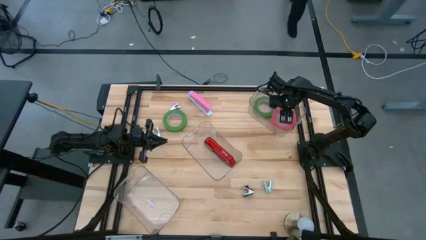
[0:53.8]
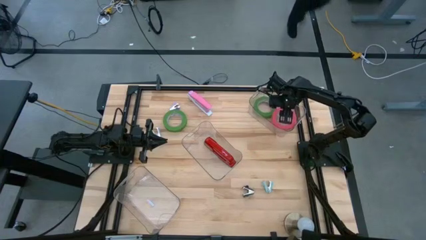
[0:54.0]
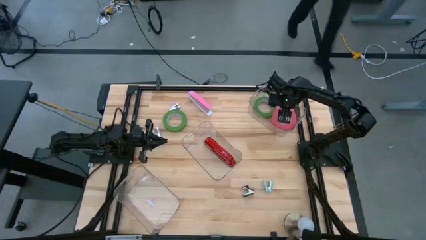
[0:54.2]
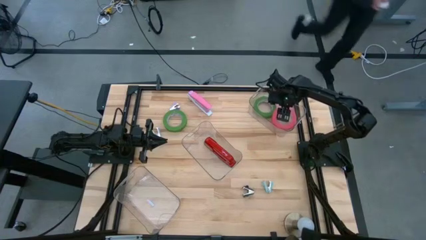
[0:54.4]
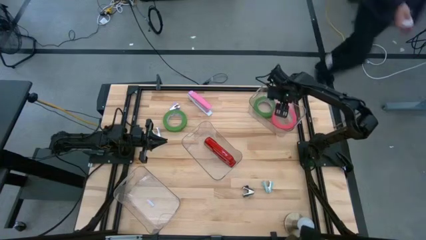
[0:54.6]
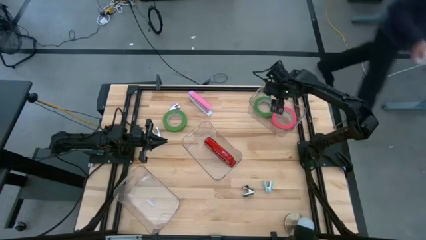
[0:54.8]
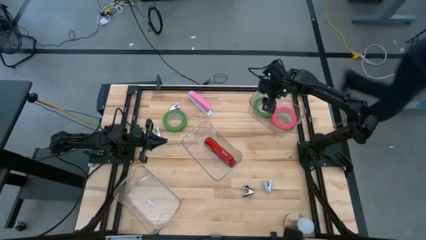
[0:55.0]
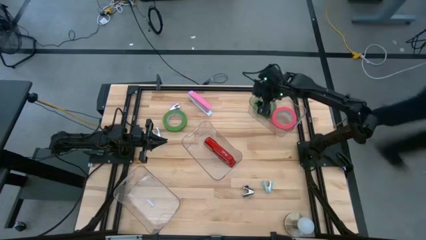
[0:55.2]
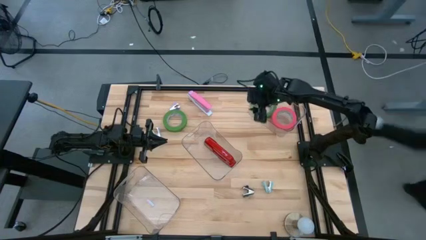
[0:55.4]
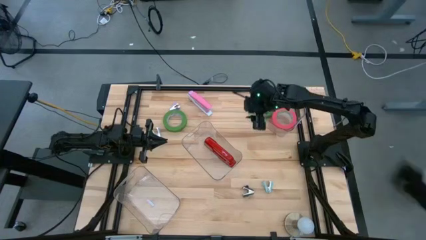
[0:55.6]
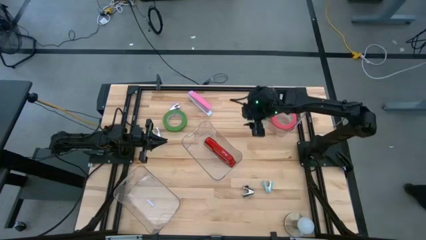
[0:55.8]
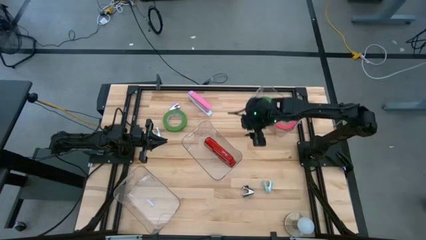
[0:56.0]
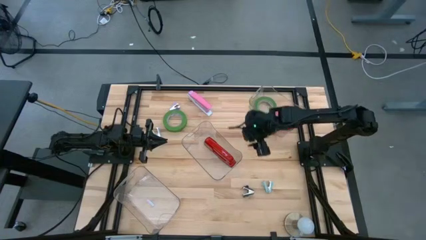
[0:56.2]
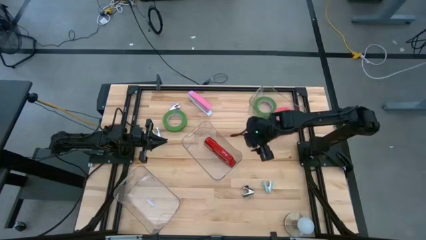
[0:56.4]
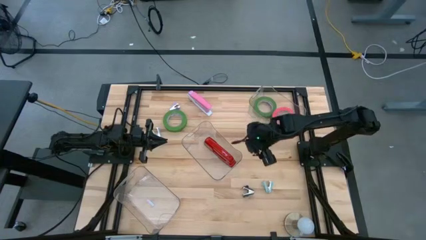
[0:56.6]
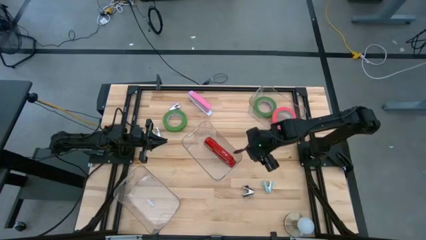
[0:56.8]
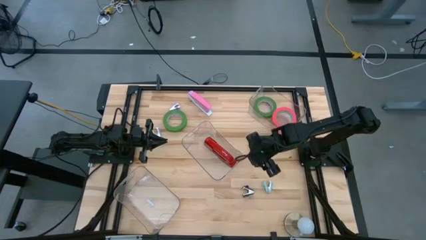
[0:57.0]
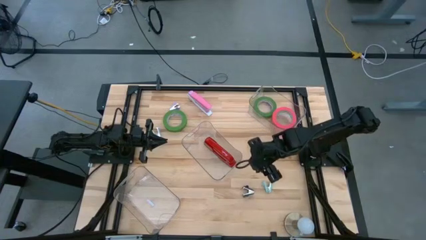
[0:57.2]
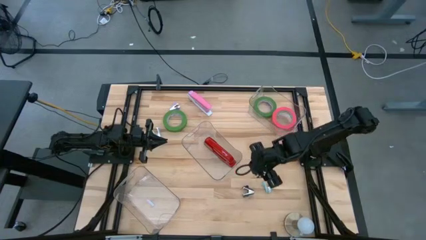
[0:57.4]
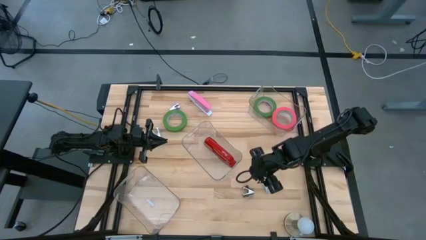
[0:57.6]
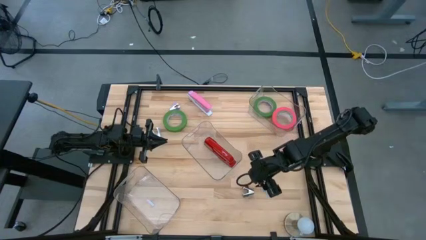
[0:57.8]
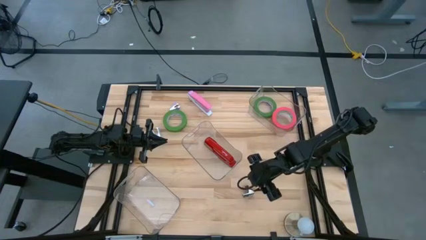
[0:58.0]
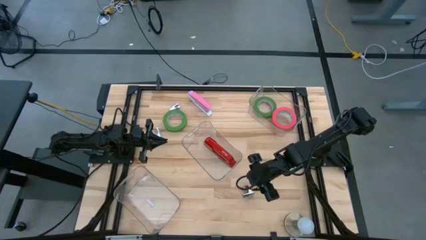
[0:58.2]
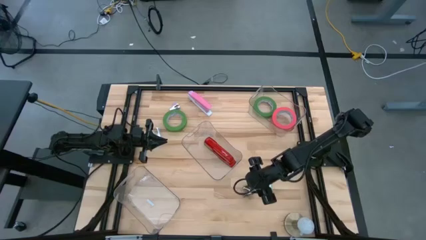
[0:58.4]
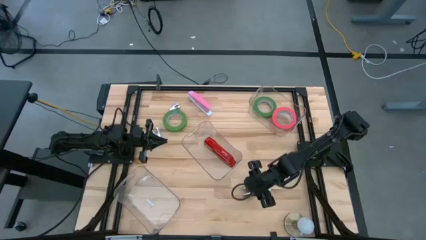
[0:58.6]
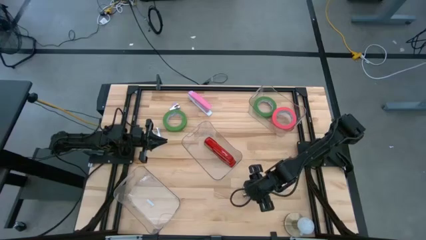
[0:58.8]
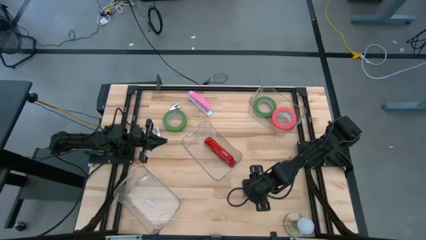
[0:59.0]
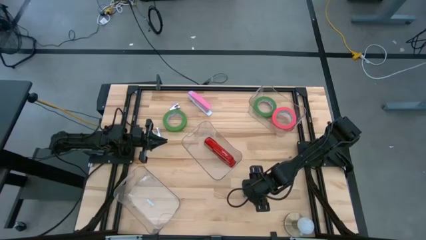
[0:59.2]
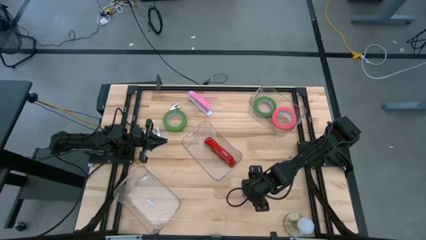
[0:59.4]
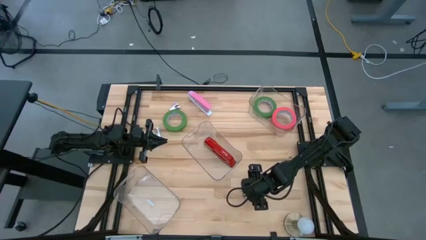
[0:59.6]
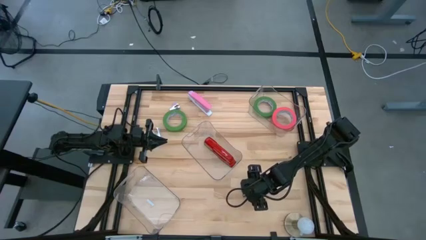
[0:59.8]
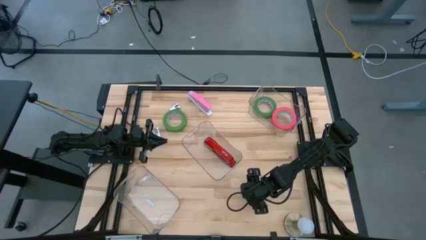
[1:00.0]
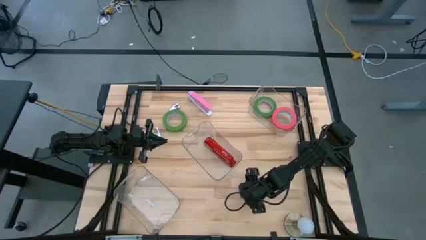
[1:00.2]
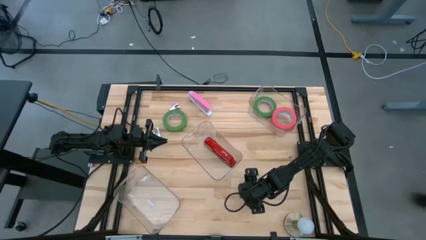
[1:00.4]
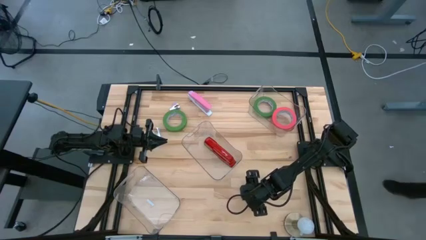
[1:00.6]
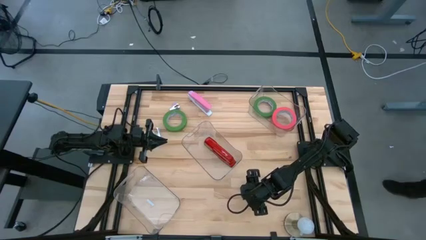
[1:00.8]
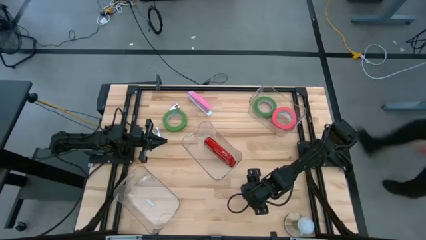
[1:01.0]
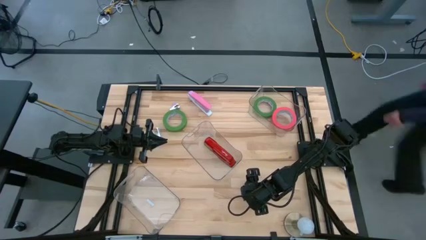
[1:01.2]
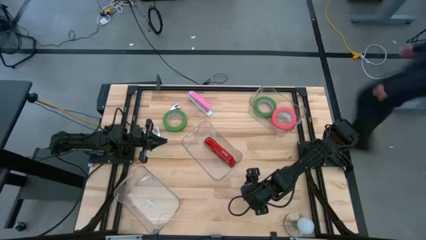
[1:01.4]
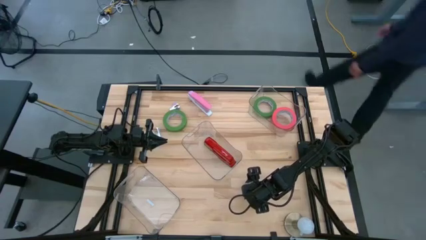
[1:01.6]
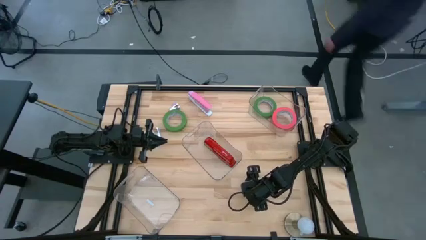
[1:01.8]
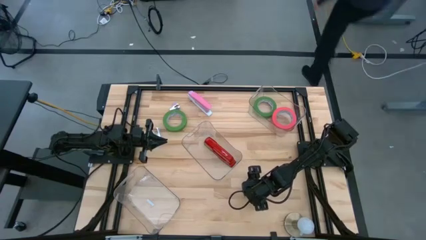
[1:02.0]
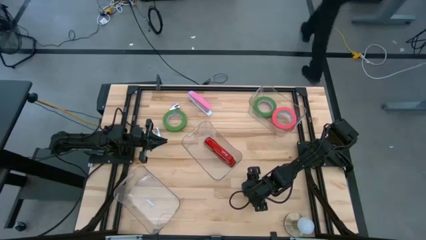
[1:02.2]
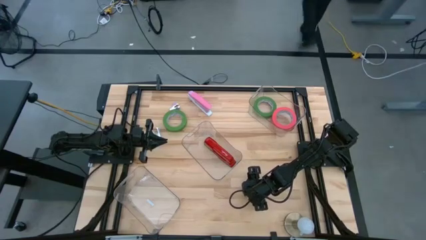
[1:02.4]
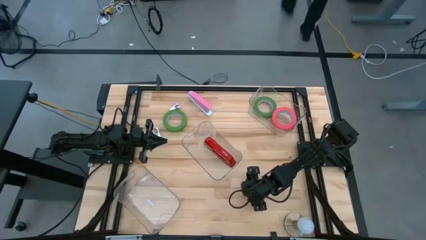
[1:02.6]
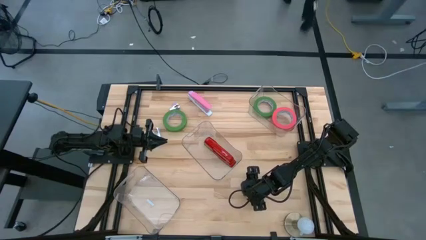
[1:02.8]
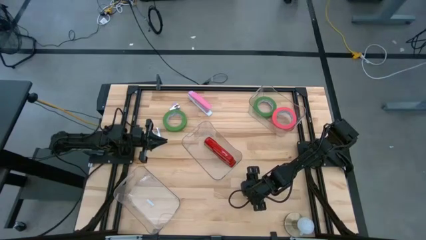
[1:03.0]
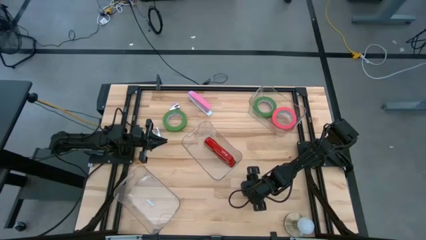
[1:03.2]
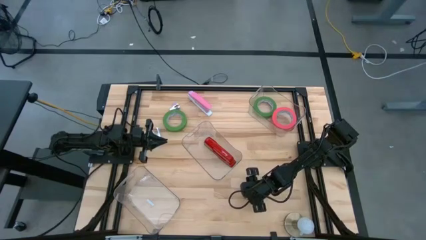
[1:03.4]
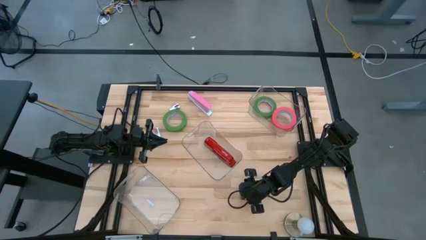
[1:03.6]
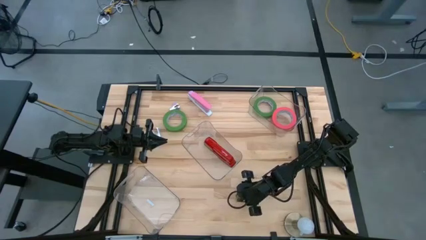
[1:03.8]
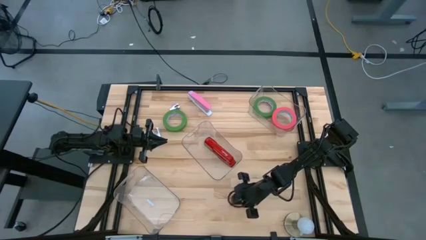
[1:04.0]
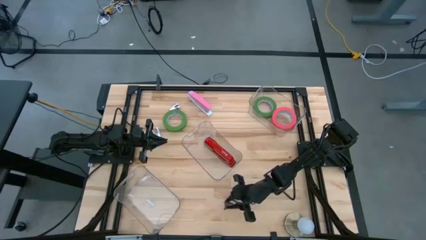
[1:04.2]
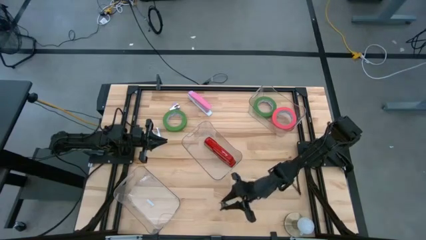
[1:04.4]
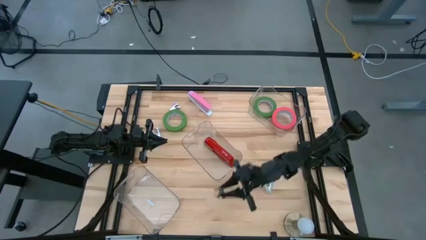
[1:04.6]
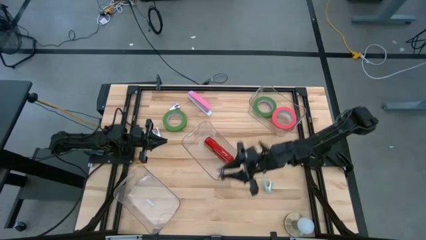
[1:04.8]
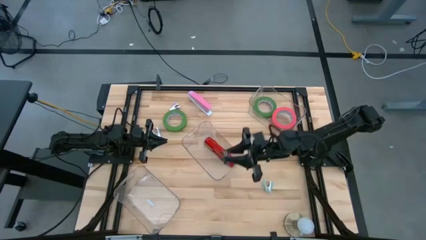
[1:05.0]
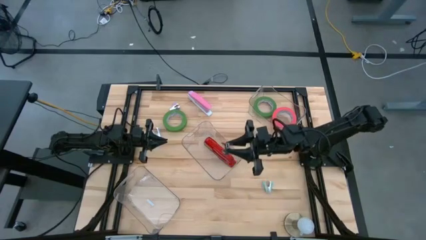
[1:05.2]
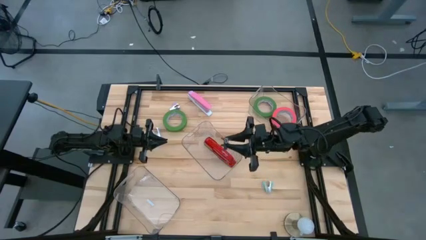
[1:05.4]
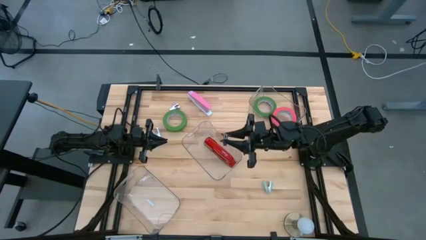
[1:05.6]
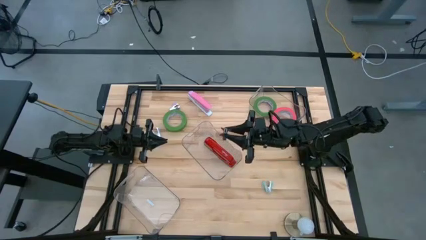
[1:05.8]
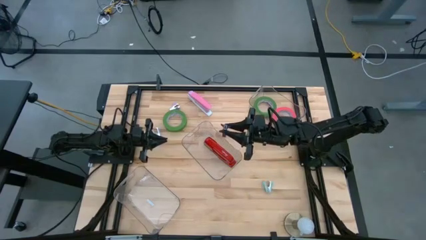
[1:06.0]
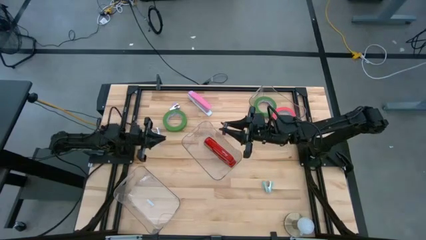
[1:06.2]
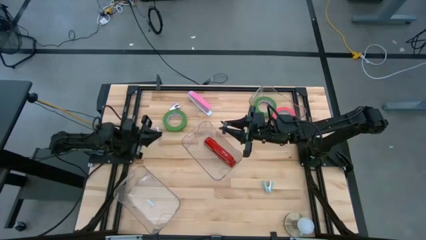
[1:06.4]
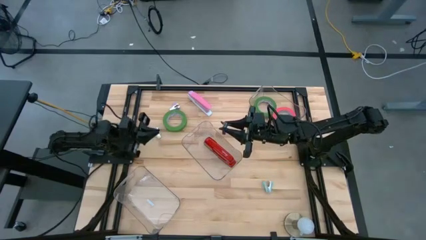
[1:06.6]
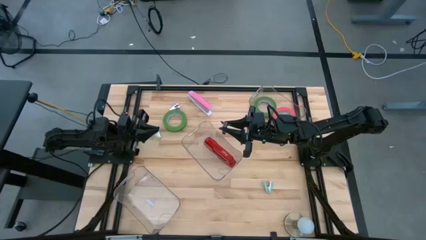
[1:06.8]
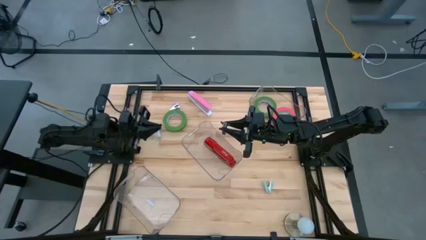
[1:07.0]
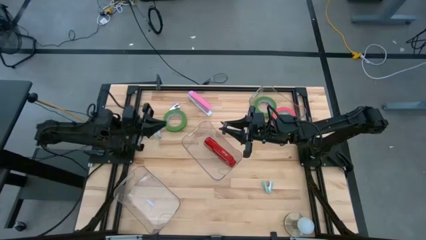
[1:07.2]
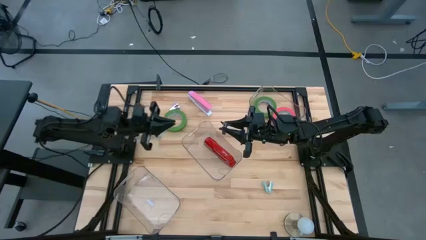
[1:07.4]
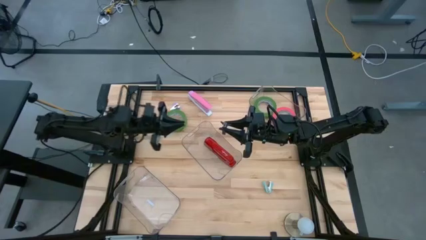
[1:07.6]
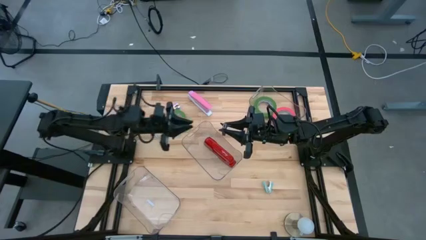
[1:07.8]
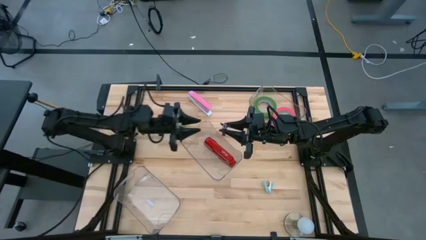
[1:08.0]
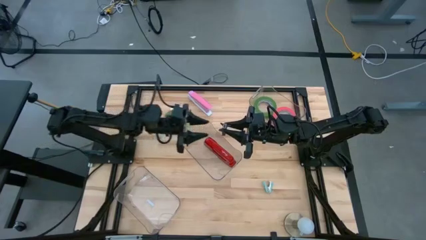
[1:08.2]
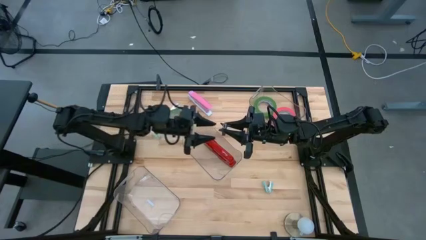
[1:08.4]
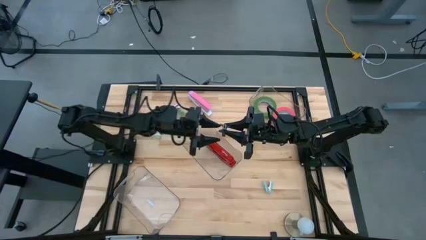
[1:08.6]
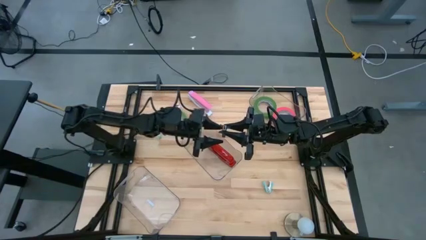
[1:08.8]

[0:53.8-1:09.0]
Task: Pick and place Stapler, Stapler remover, tape
Put the black staple remover into the bottom transparent bin

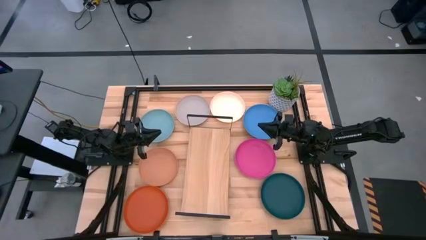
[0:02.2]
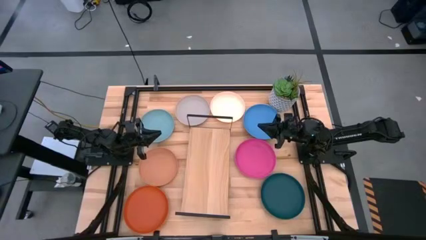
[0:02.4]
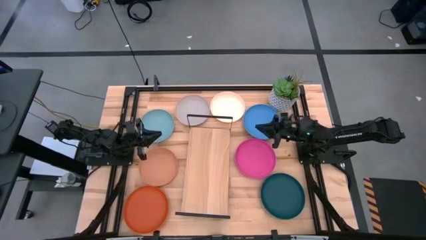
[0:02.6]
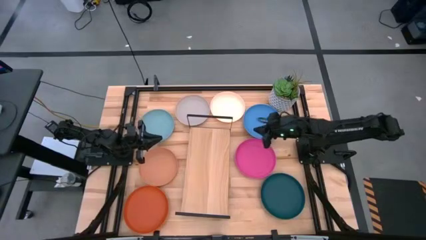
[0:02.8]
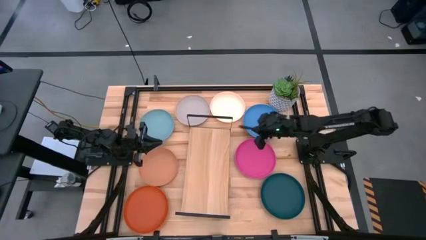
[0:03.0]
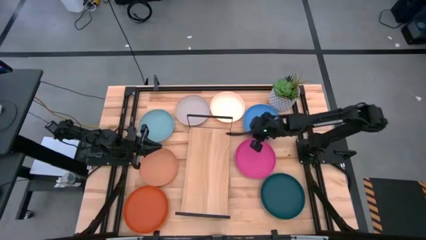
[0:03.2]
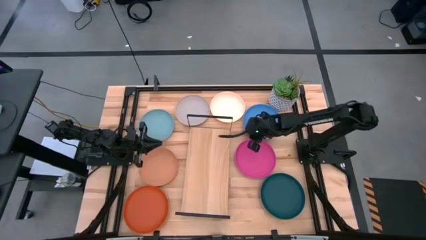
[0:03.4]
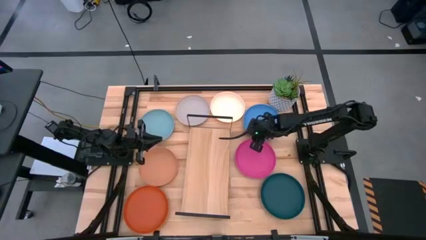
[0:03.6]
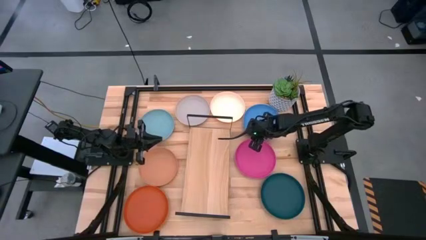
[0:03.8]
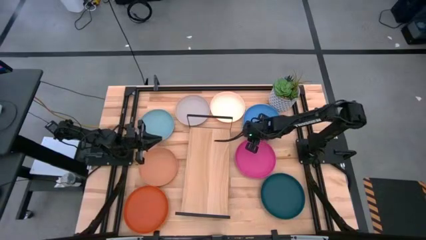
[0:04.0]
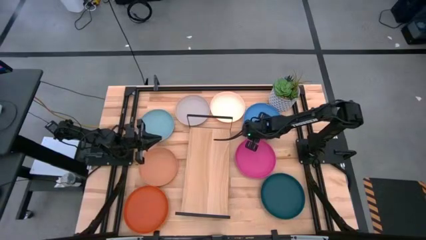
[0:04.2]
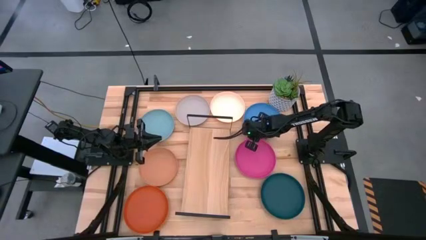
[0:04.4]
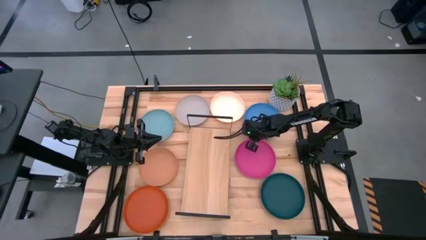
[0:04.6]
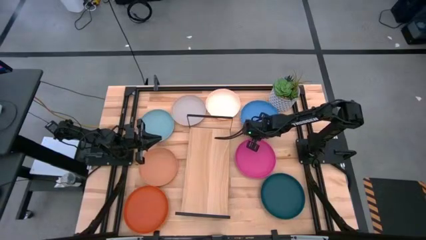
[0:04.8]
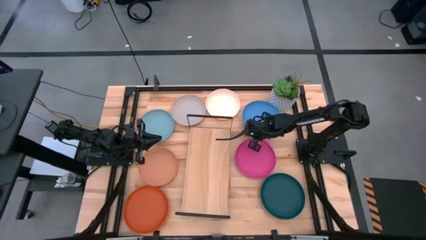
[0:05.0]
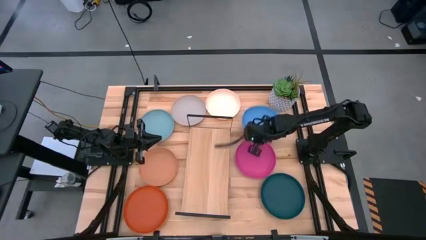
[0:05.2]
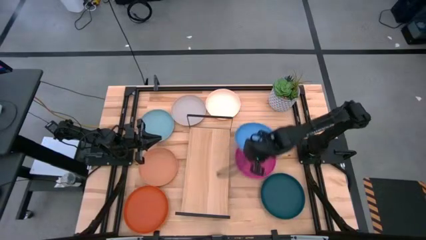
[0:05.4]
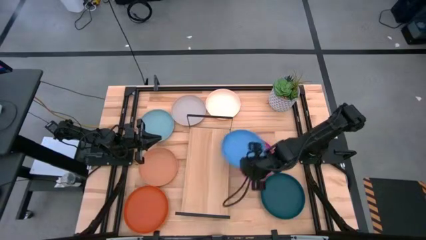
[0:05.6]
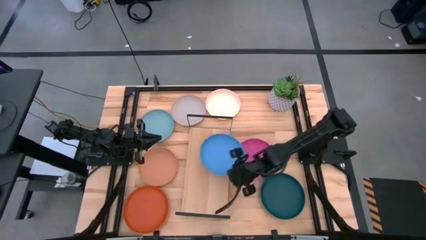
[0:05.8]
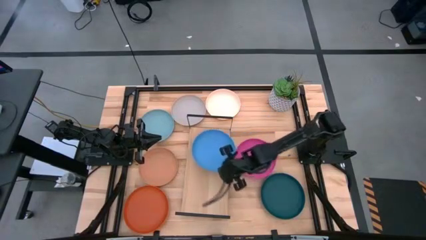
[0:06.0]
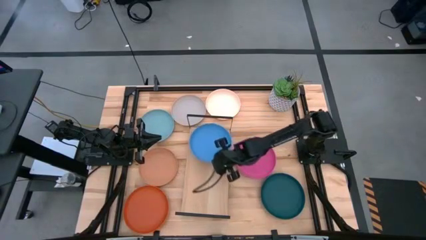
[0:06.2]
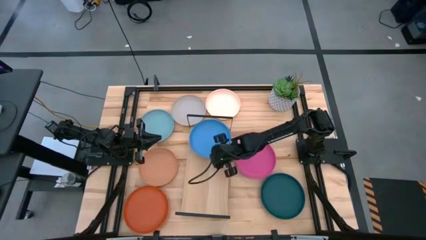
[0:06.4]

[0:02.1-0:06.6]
Task: Place and stack plates onto a shelf
Put the blue plate on the shelf
